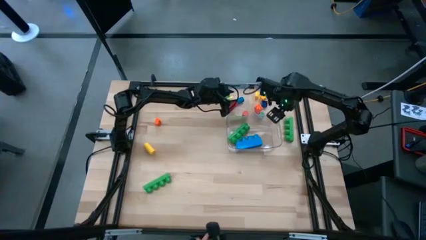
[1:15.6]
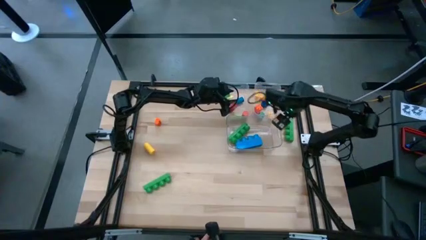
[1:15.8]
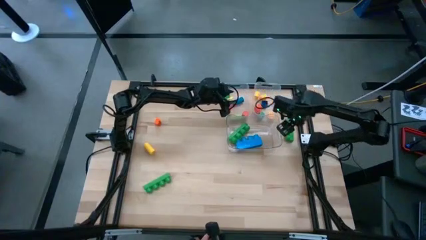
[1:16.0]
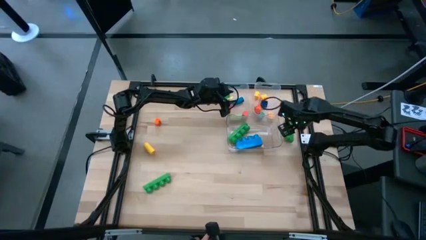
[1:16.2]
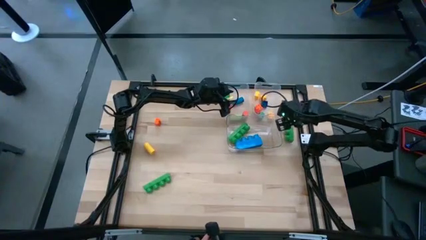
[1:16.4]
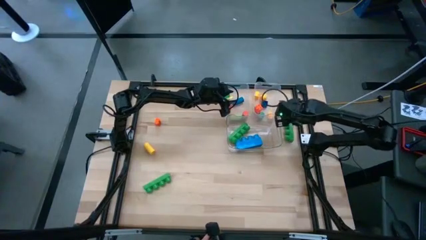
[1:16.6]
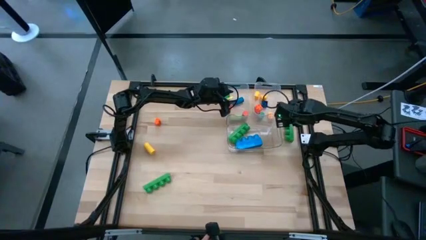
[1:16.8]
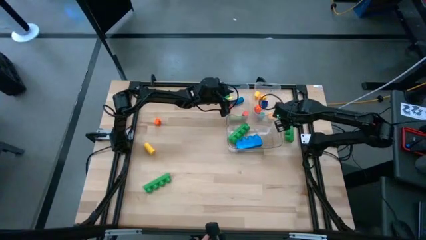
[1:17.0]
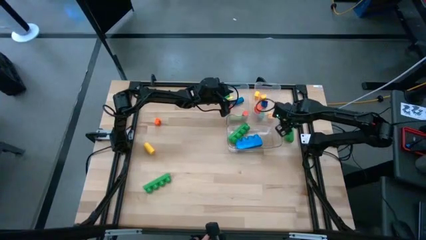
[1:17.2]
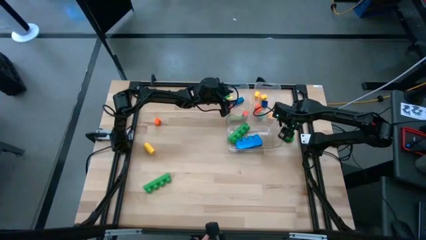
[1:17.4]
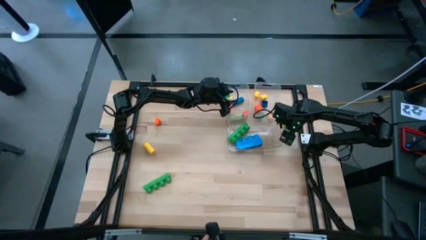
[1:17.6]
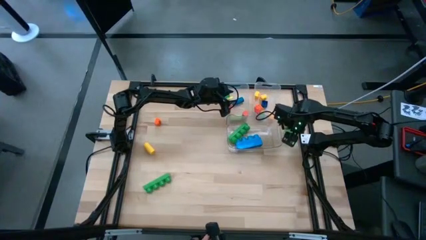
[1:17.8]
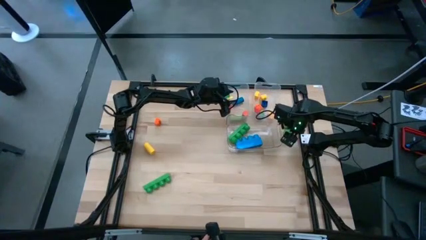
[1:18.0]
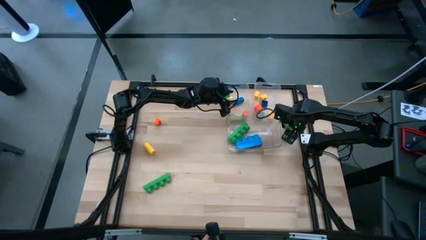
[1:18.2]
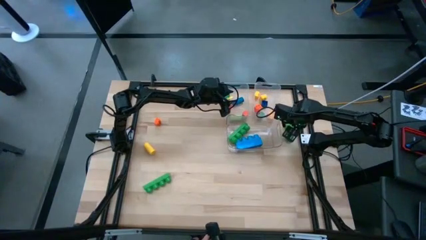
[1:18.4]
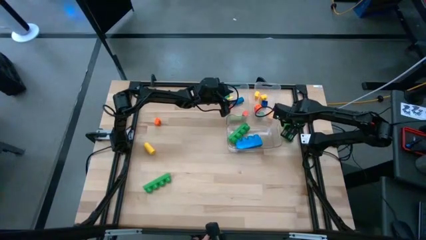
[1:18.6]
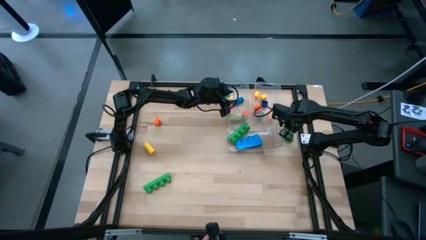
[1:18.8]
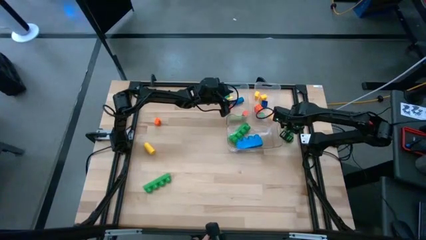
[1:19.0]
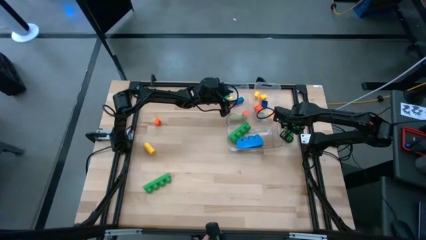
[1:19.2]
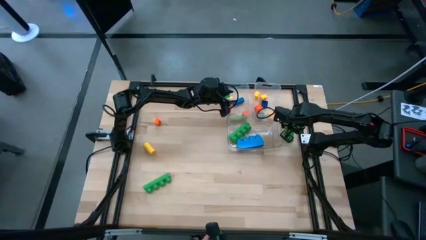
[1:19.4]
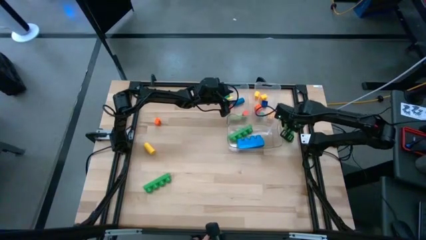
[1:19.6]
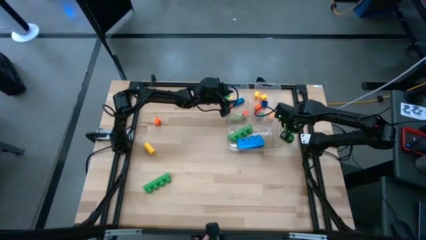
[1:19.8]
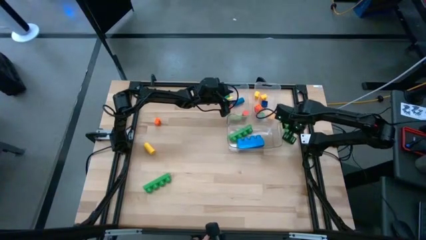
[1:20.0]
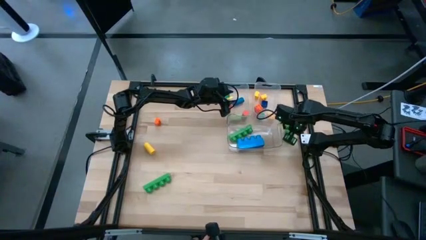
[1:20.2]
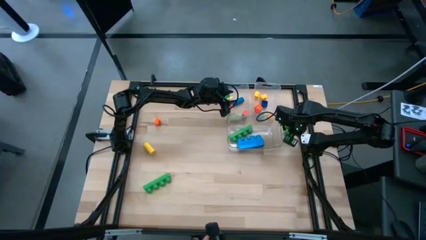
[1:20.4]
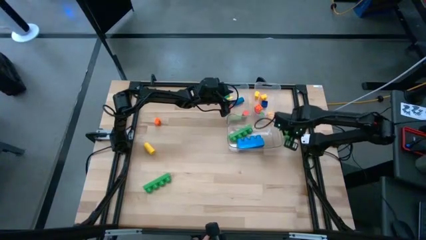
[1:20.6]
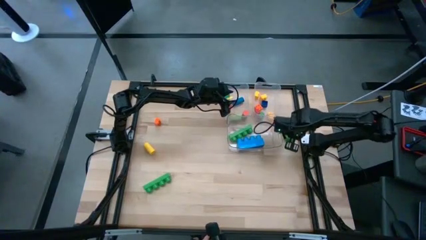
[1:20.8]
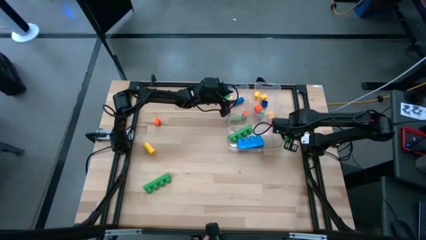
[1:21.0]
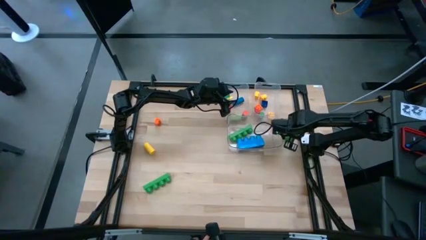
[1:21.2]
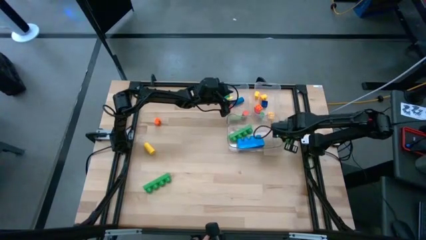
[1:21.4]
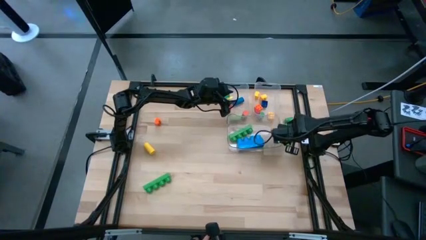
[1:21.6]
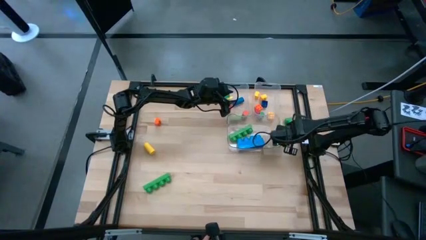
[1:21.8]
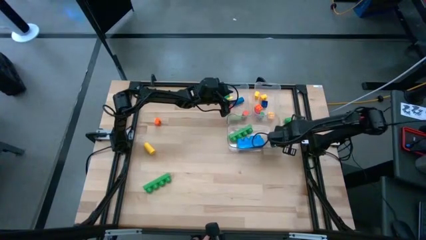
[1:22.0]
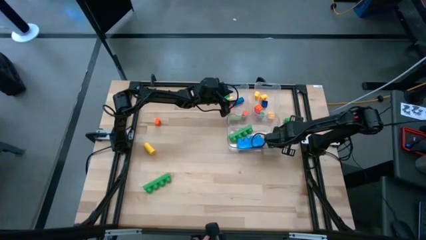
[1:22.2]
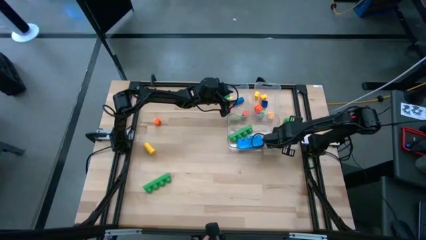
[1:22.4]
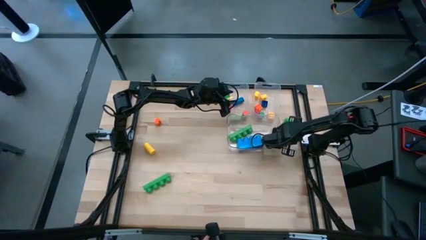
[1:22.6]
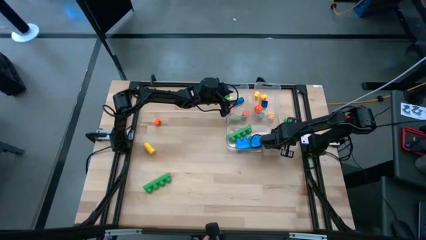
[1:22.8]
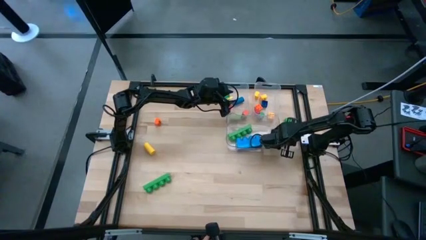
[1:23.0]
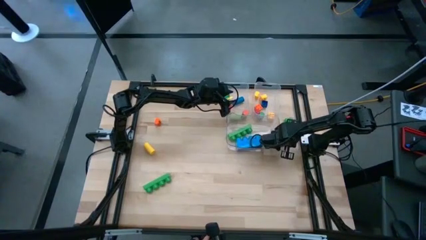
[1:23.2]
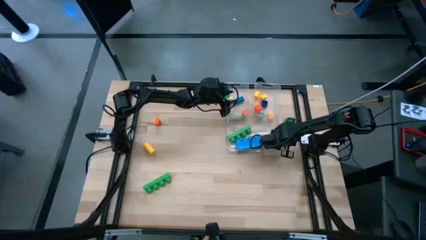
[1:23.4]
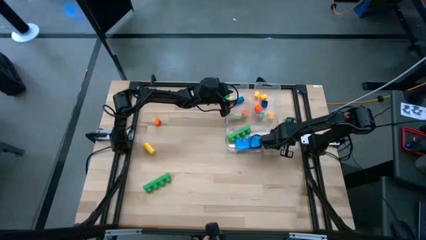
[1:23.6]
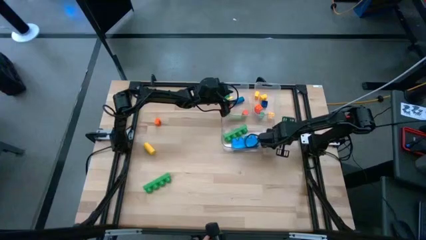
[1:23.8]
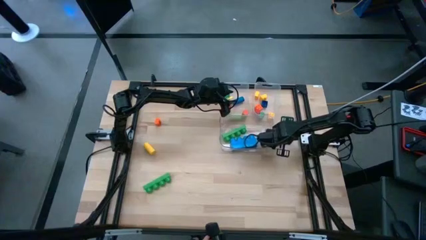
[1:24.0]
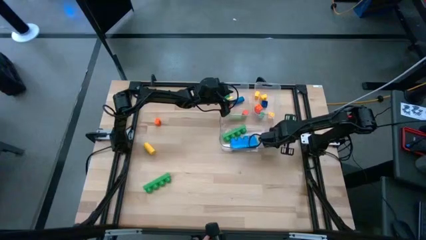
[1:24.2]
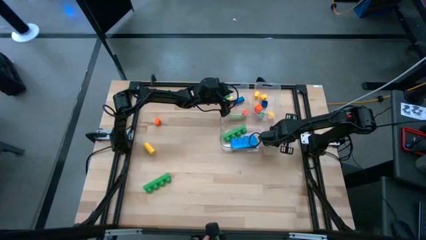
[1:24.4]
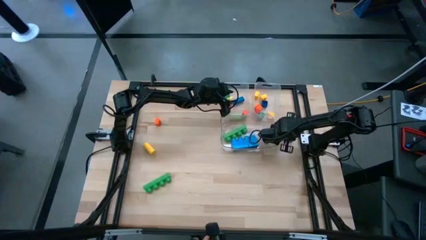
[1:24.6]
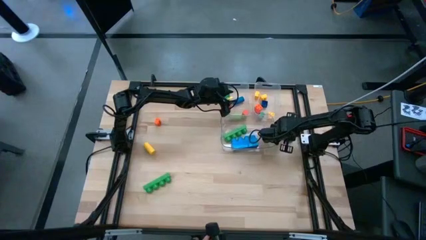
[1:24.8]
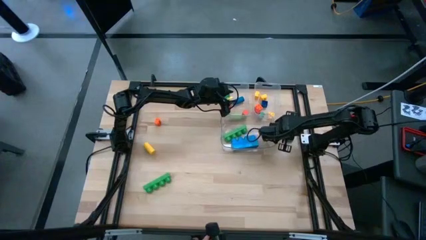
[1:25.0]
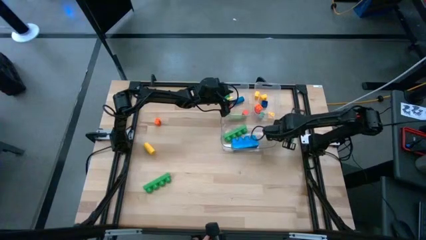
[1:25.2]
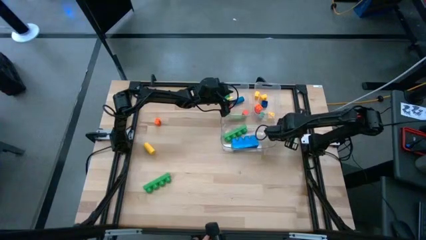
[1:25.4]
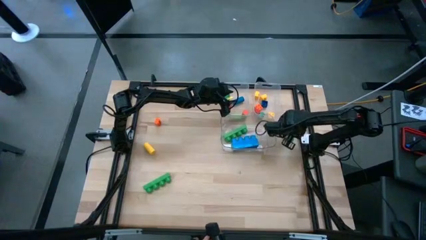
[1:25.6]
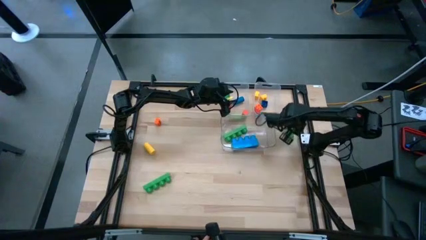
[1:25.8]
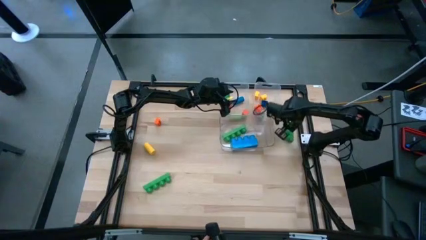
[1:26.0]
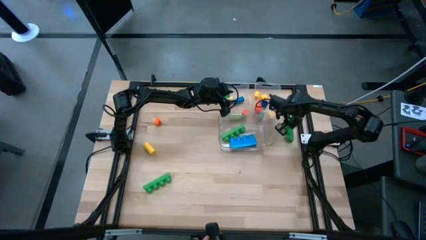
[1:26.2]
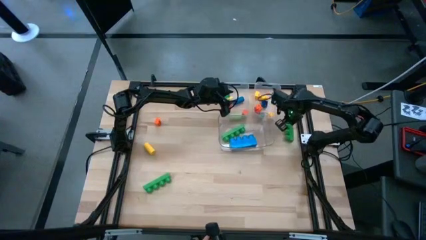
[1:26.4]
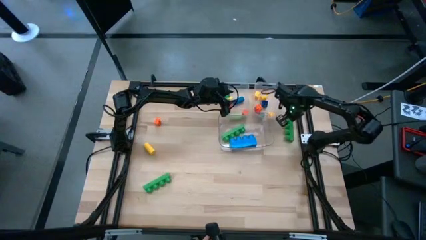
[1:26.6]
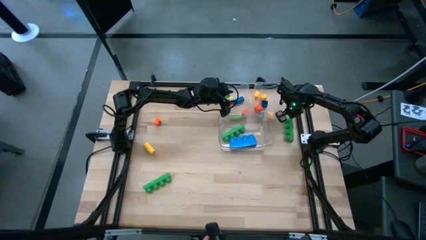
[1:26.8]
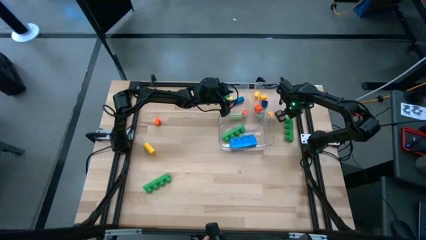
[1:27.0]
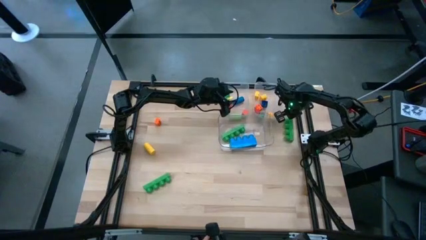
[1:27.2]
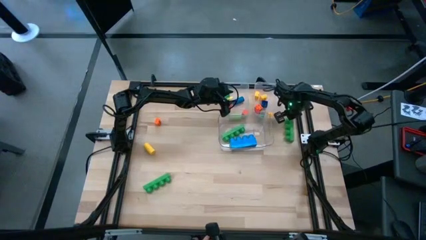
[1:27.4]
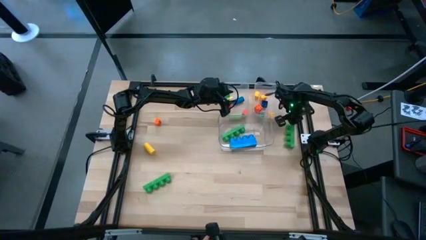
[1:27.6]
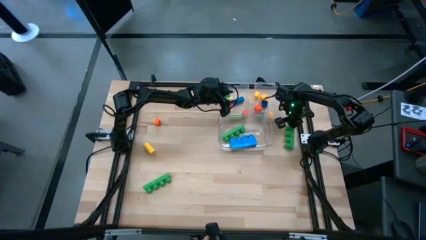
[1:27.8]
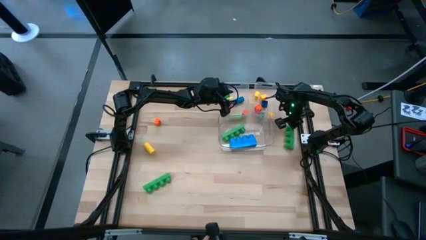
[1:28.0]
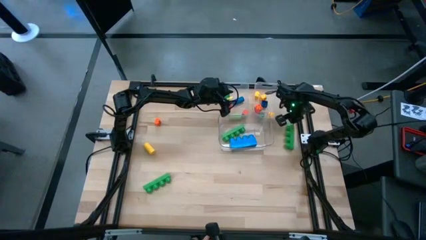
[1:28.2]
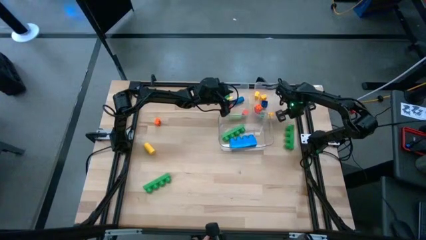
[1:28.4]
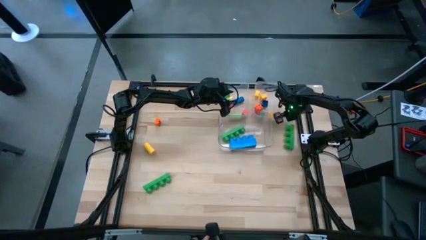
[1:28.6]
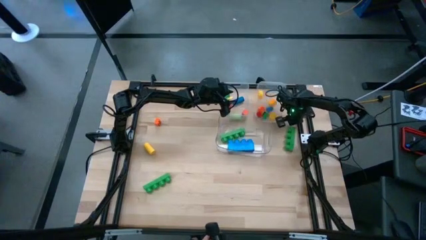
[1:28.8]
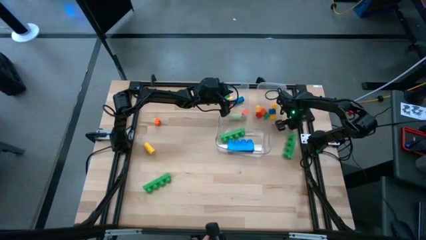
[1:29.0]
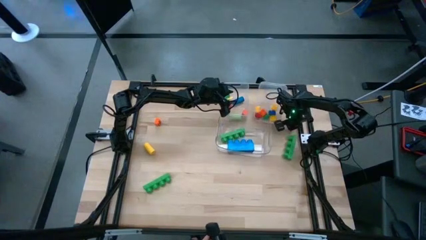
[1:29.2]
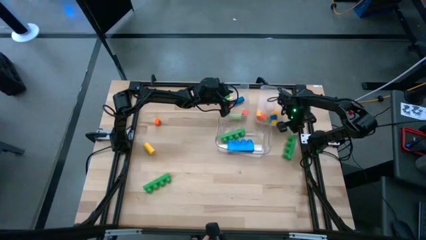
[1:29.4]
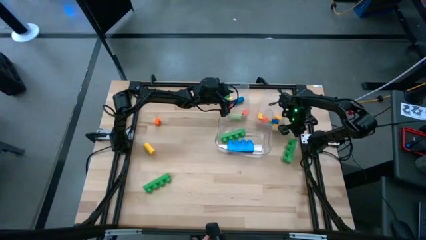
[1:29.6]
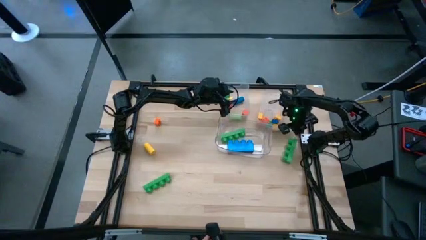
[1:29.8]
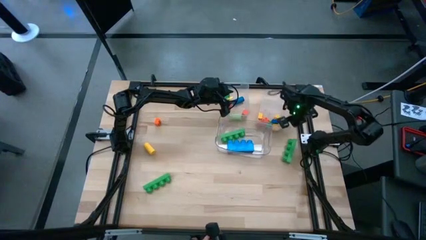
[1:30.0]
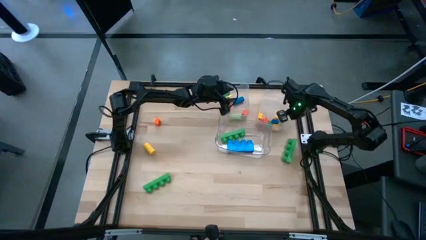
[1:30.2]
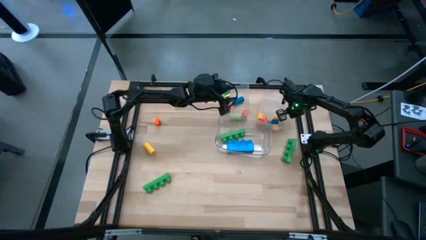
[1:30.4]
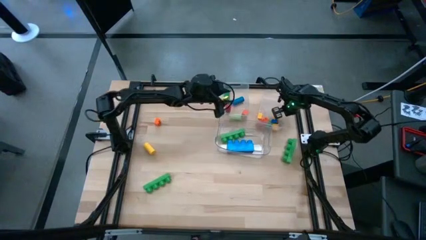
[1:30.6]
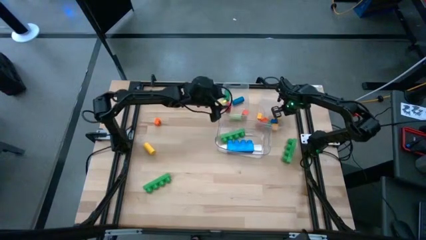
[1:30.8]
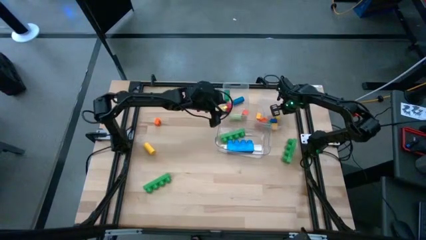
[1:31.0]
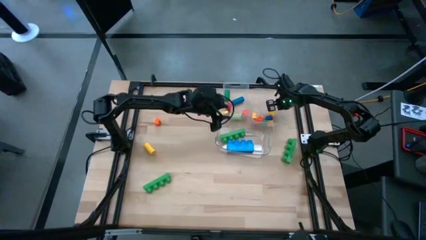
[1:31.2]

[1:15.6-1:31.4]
Task: Sort blocks by size
Put the top large green 4 stud game piece into the bottom transparent bin
